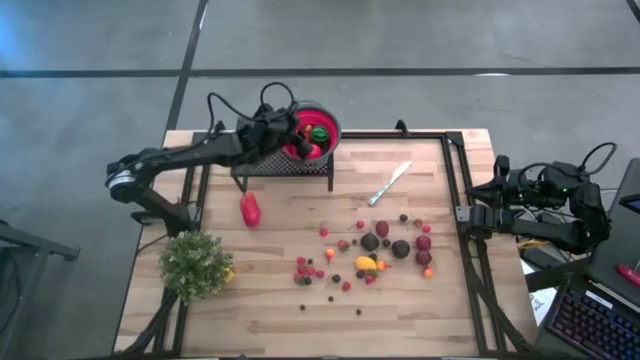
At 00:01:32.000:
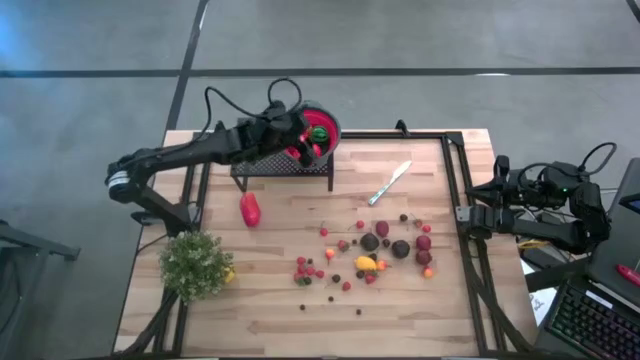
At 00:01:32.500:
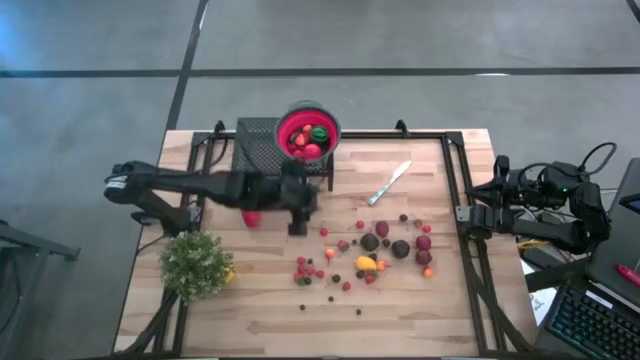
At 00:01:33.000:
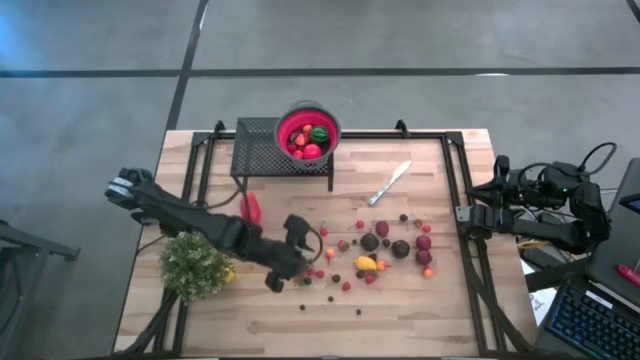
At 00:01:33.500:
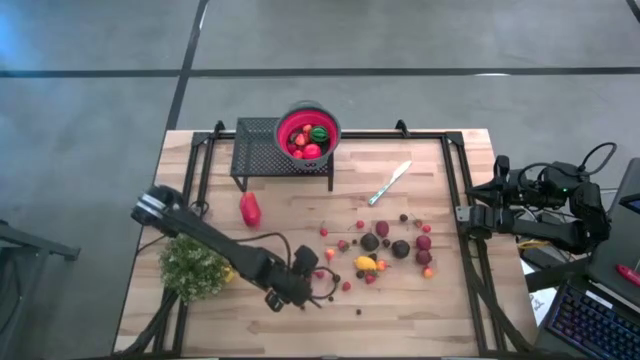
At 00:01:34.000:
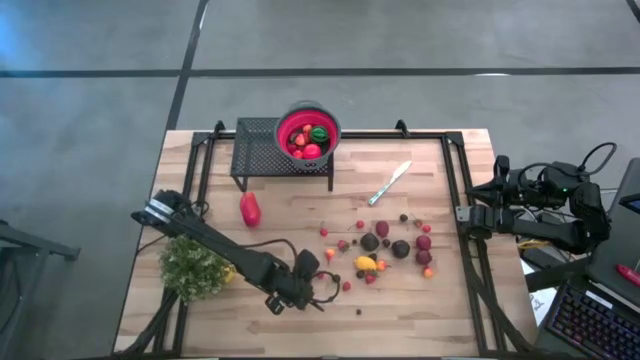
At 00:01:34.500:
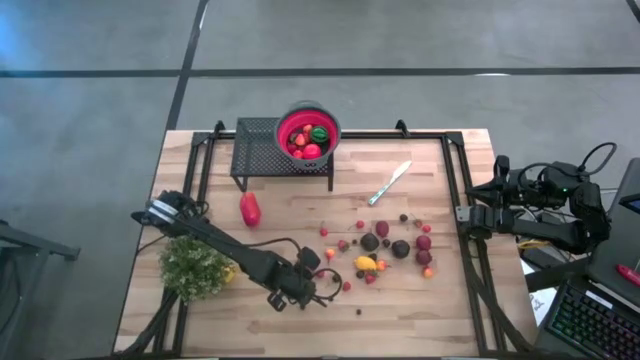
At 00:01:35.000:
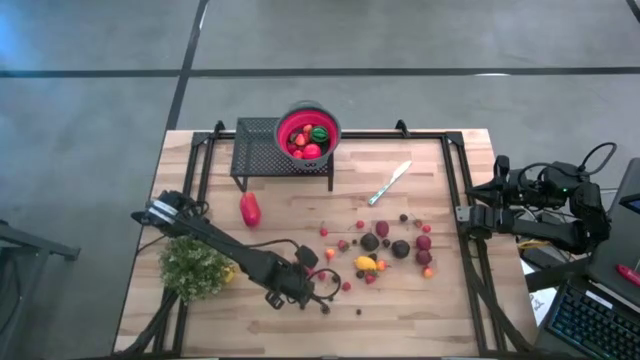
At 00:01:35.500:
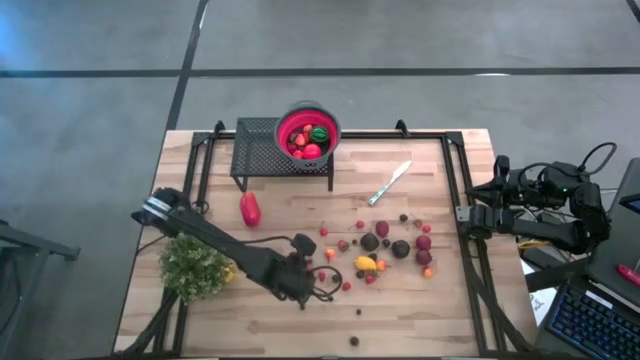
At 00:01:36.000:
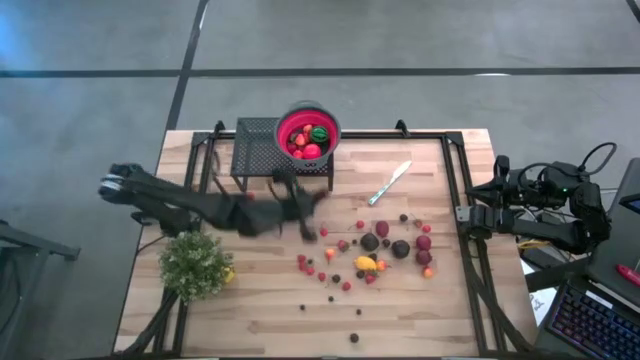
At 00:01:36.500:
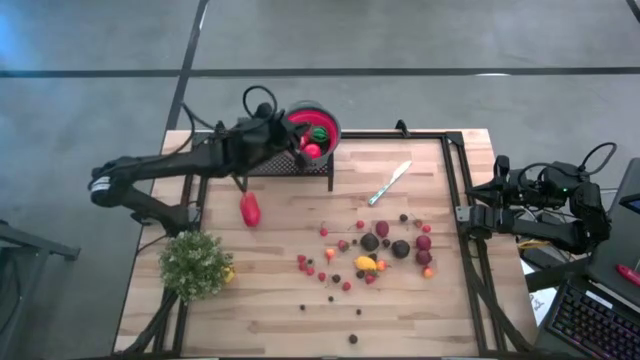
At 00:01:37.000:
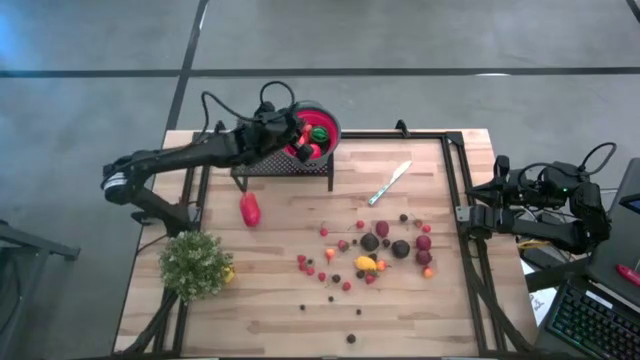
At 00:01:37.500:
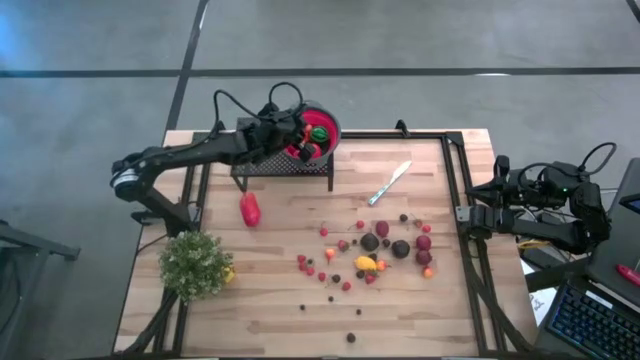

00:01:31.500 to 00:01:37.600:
Task: Pick & Place Fruit
Put the red strawberry into the red gray strainer bowl on the shelf

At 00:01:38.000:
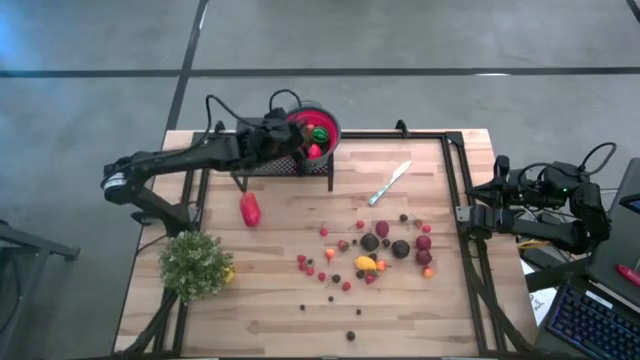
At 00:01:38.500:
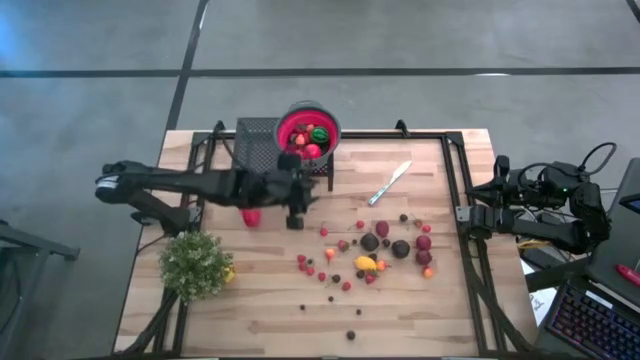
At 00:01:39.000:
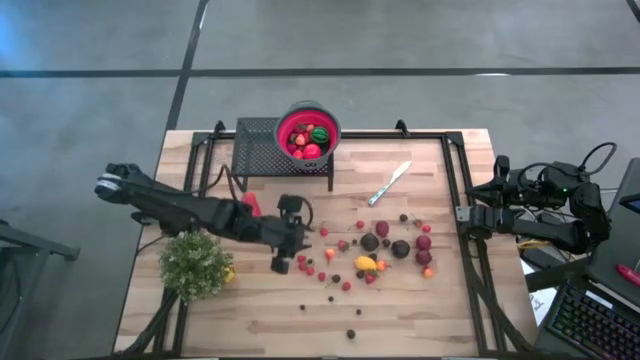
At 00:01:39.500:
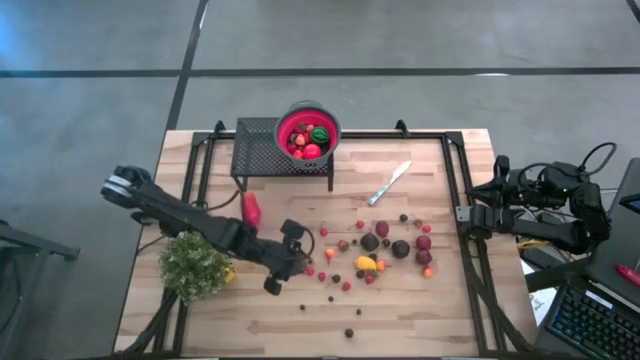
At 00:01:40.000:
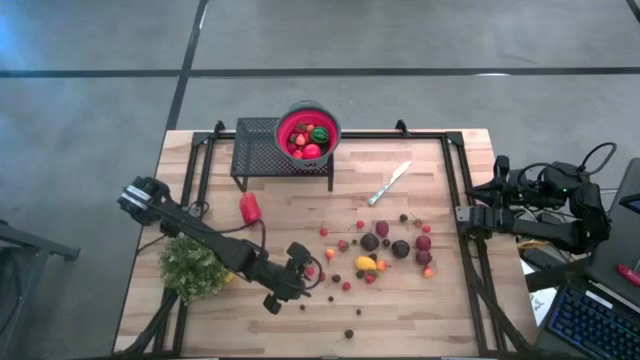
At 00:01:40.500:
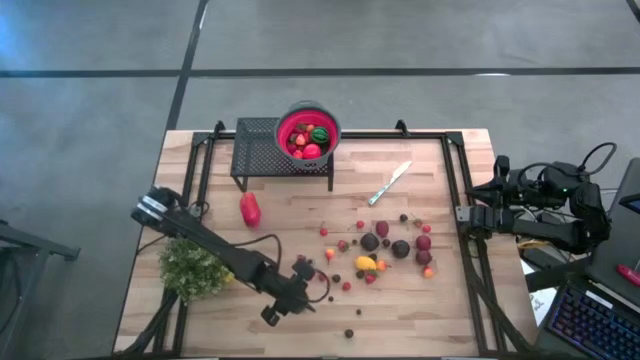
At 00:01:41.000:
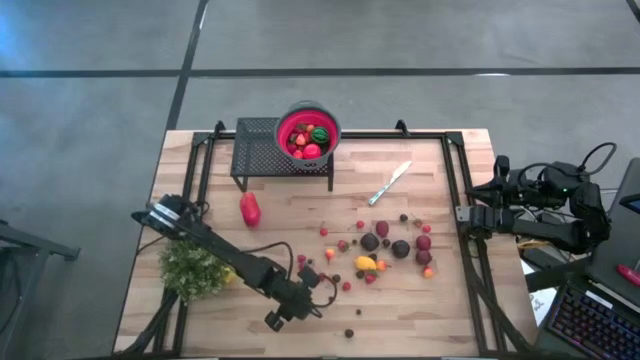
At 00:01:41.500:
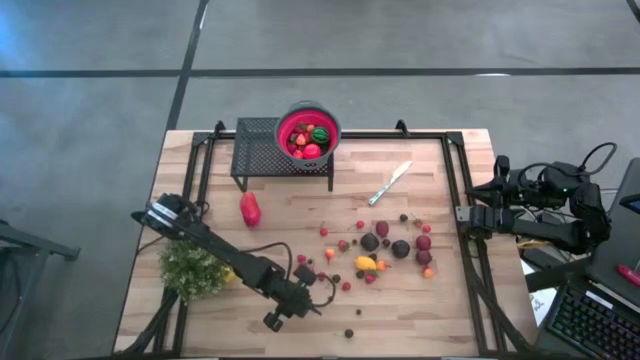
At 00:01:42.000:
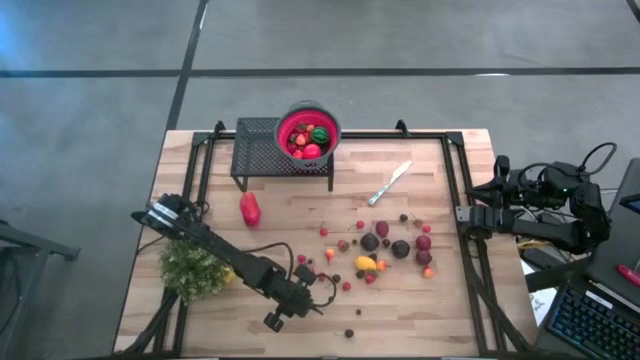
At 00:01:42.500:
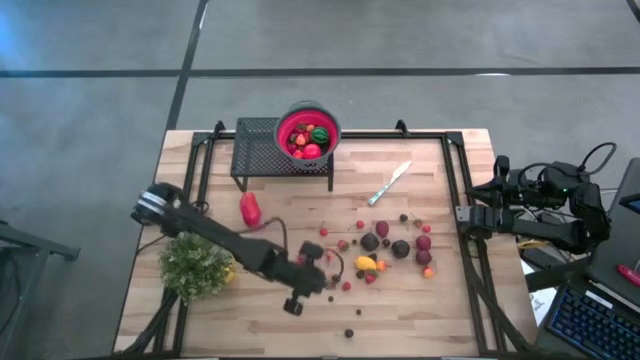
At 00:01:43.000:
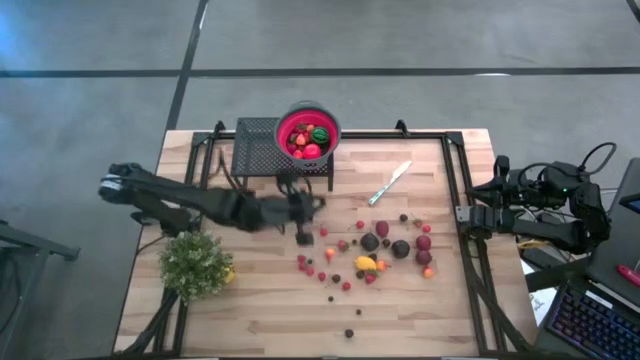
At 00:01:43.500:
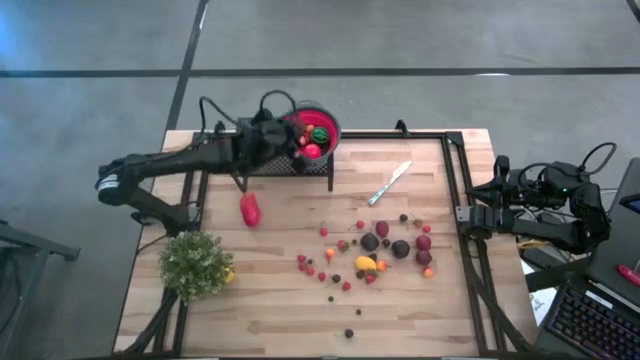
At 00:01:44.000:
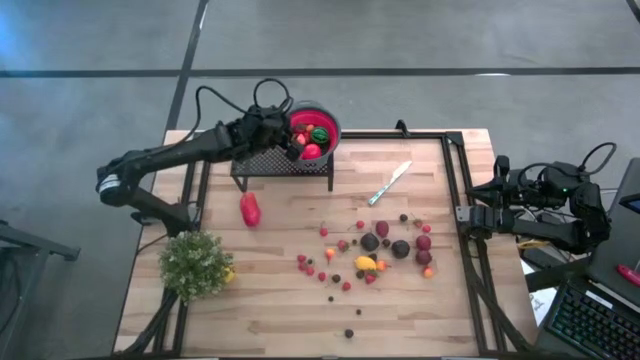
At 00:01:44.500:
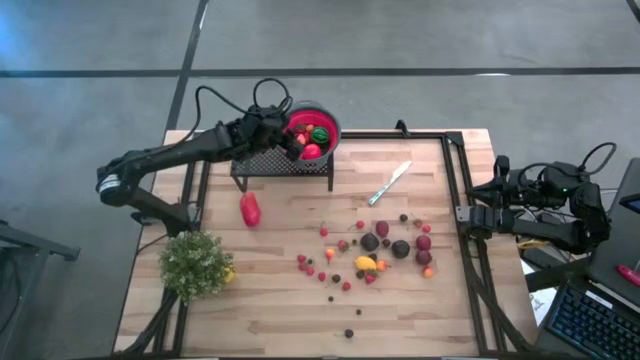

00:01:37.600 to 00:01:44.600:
Put the blueberry into the red gray strainer bowl on the shelf

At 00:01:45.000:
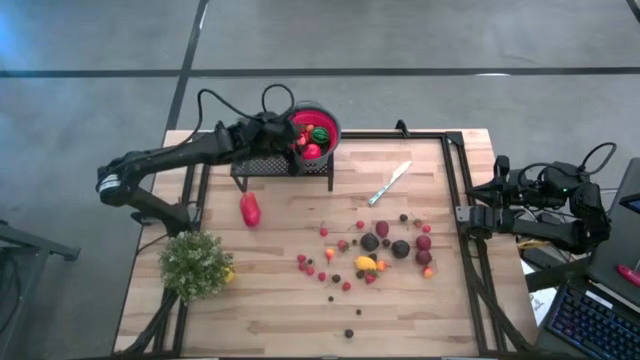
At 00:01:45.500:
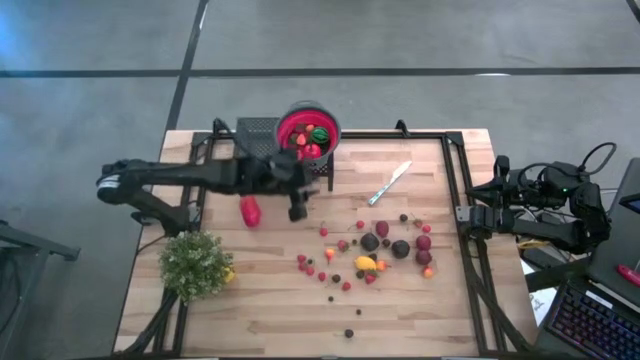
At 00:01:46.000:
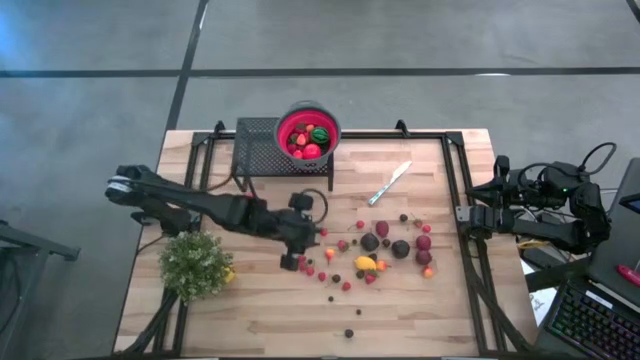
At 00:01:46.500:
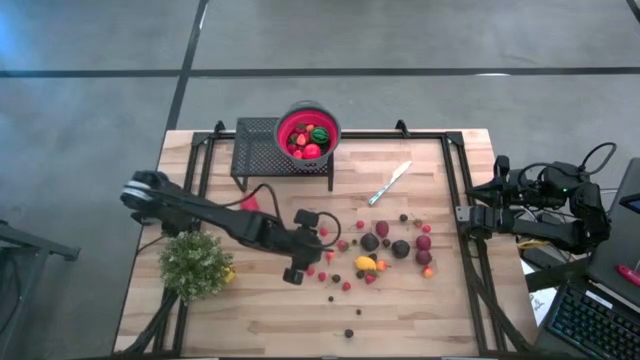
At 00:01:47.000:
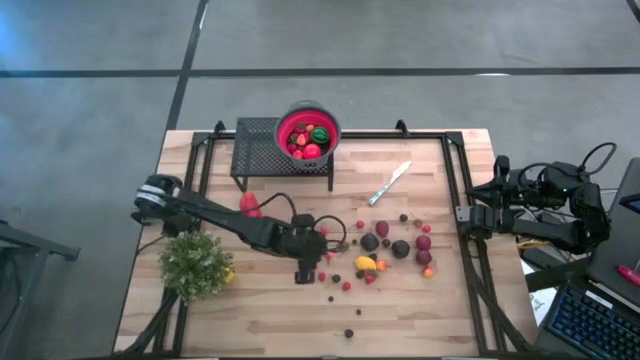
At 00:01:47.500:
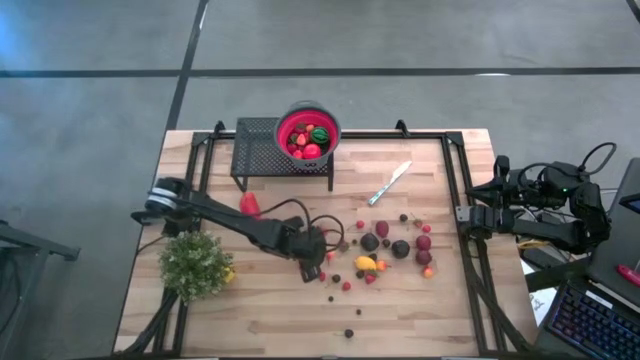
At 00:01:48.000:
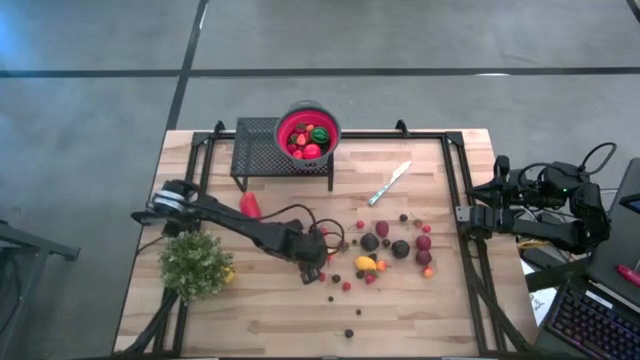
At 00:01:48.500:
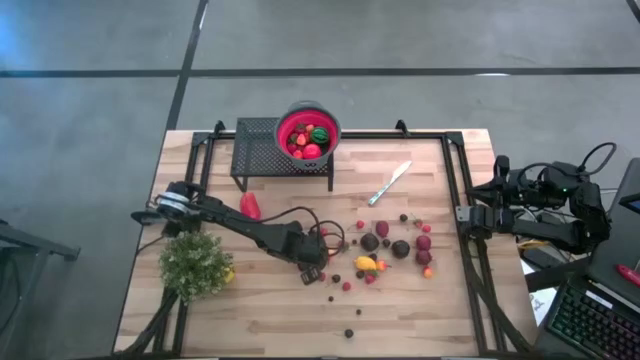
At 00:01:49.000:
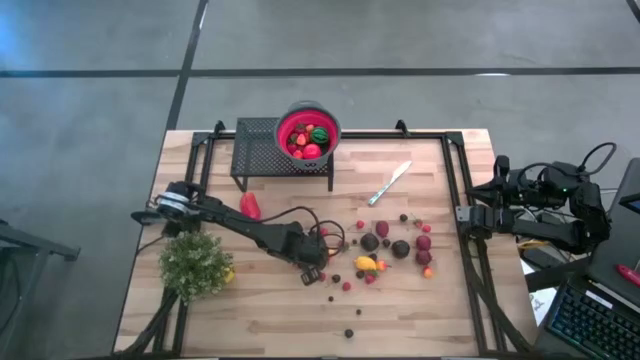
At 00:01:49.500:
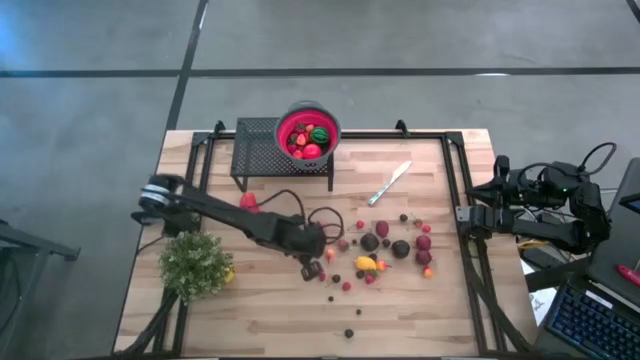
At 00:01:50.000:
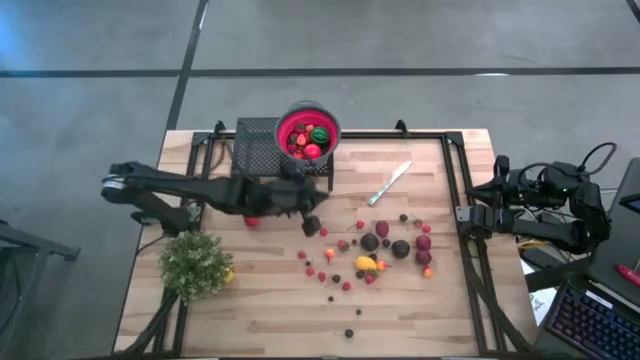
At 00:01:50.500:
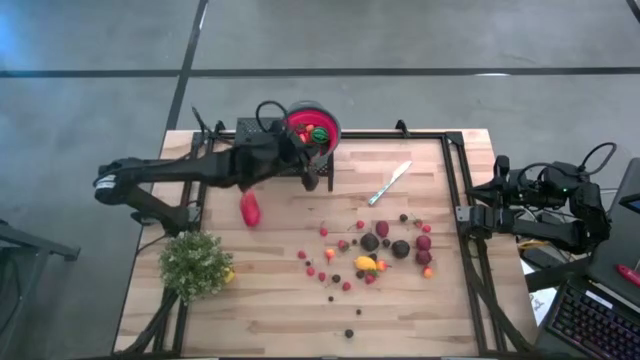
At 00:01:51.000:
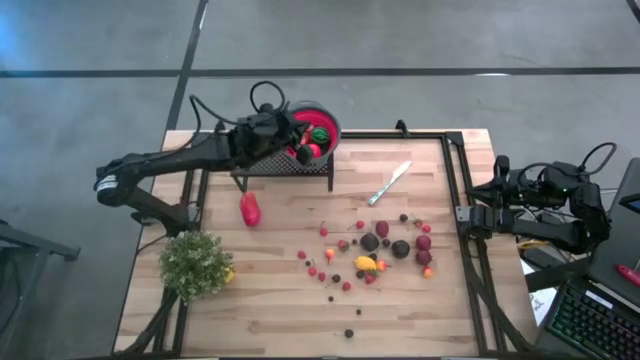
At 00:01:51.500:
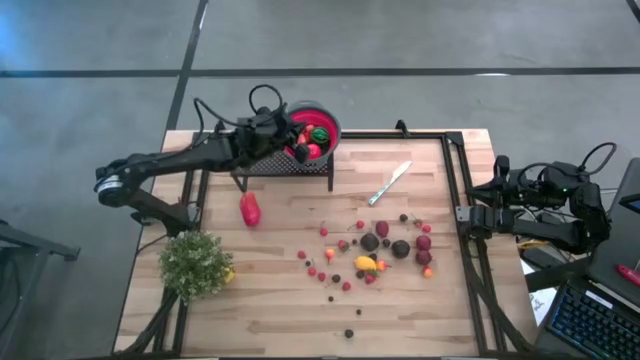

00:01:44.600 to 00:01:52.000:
Put the red cherry into the red gray strainer bowl on the shelf
